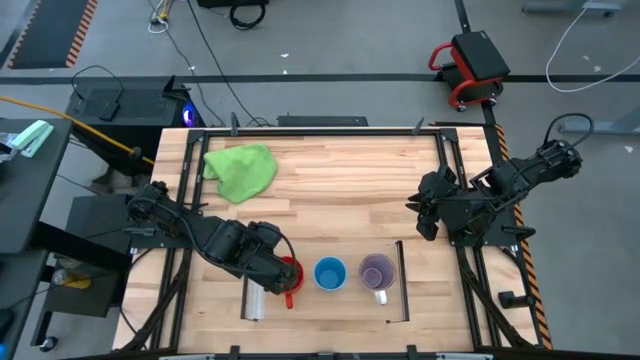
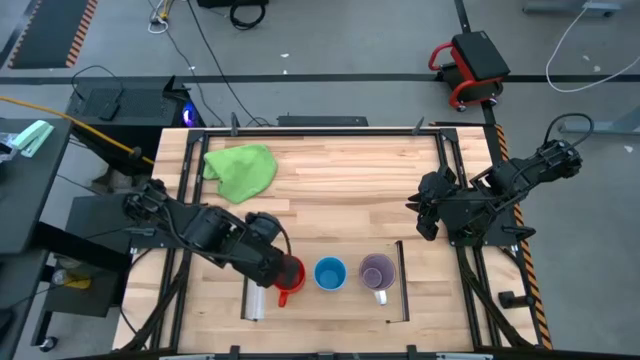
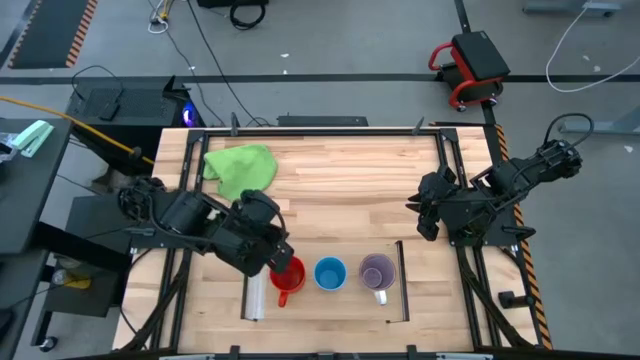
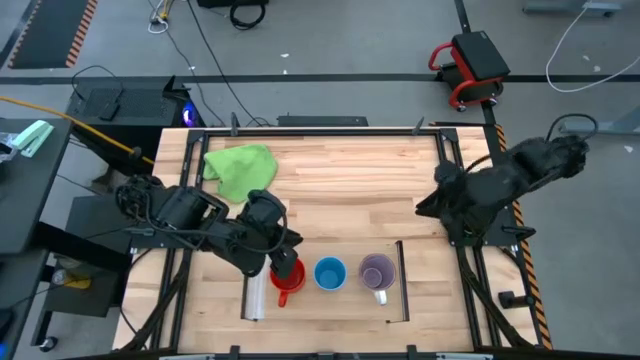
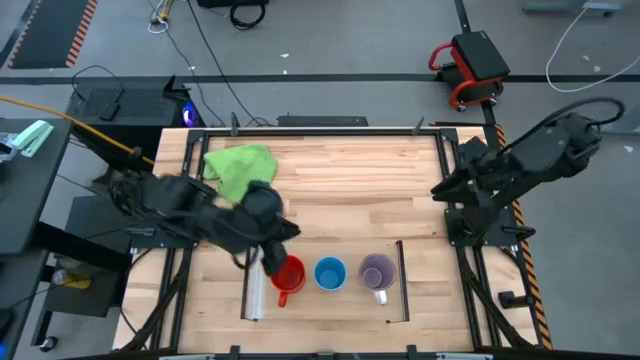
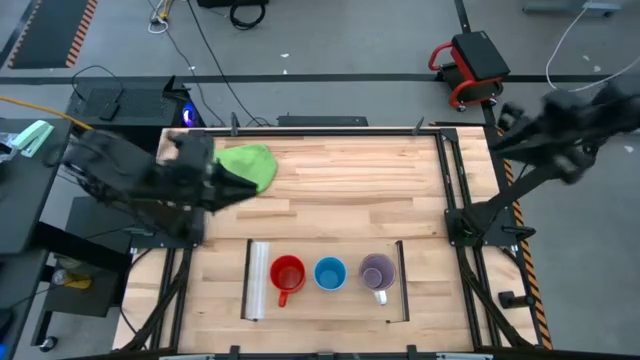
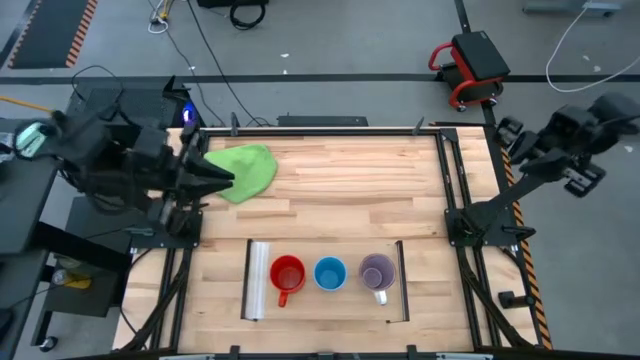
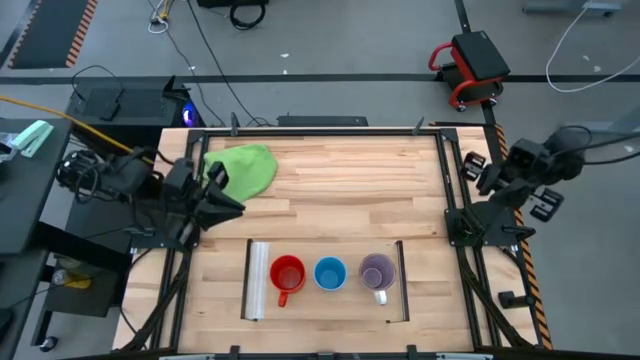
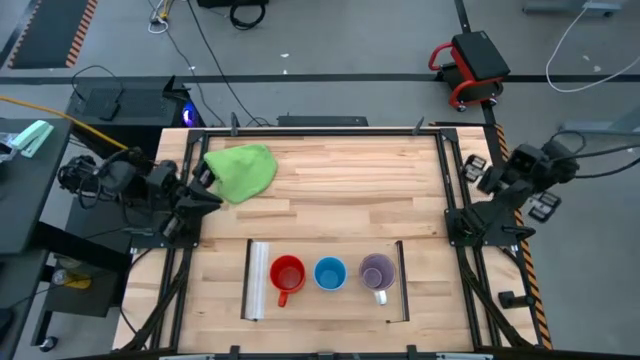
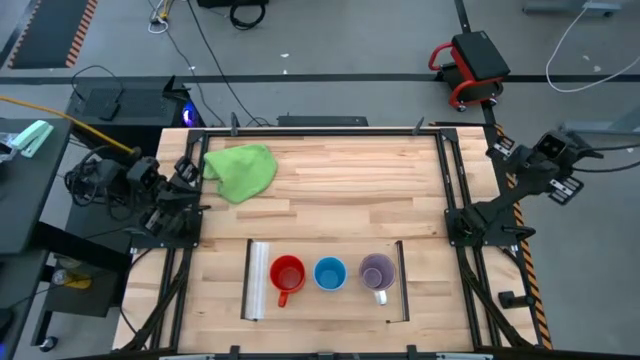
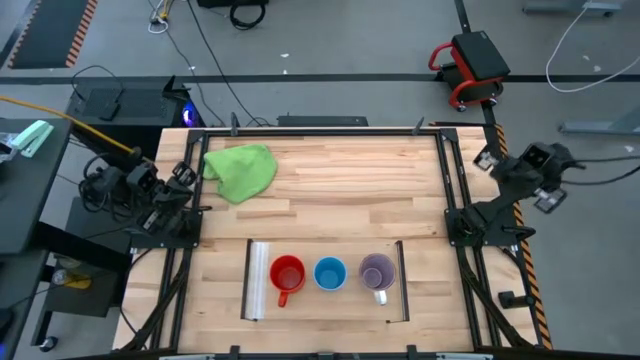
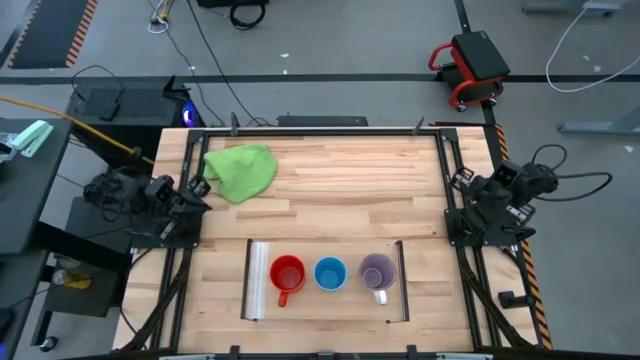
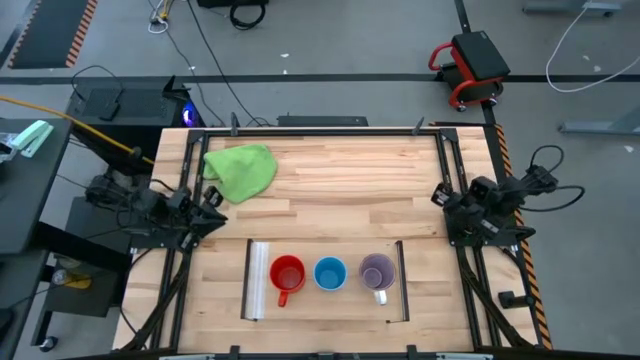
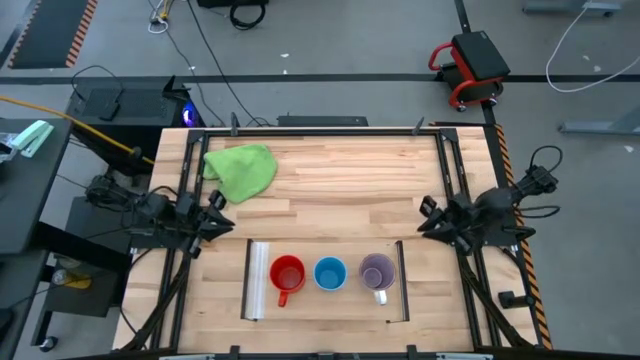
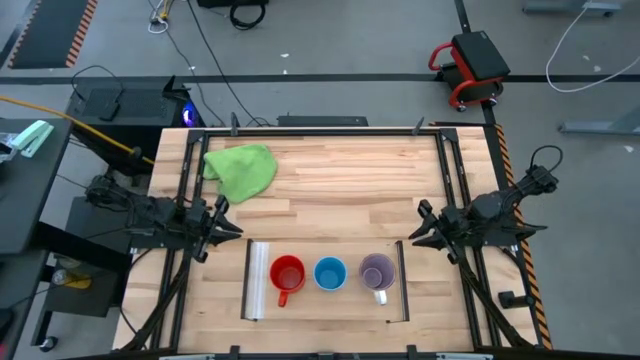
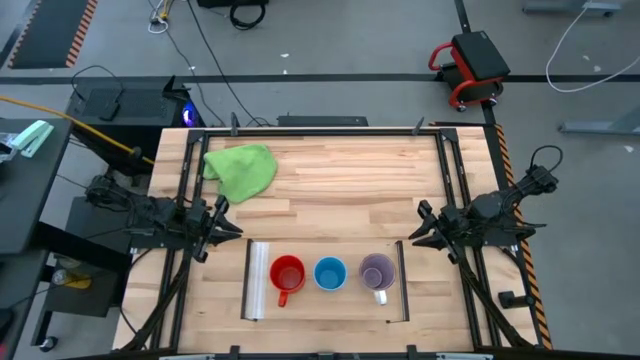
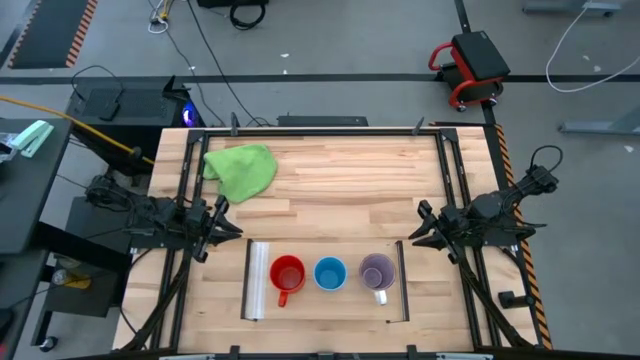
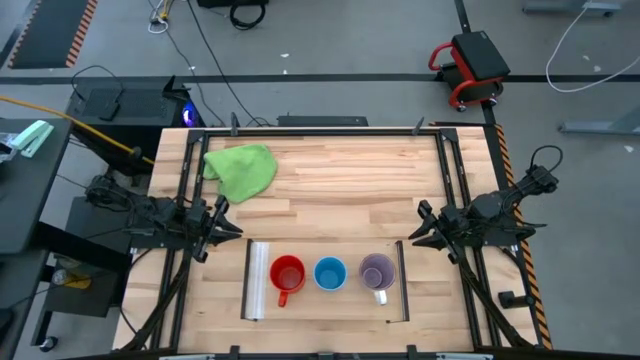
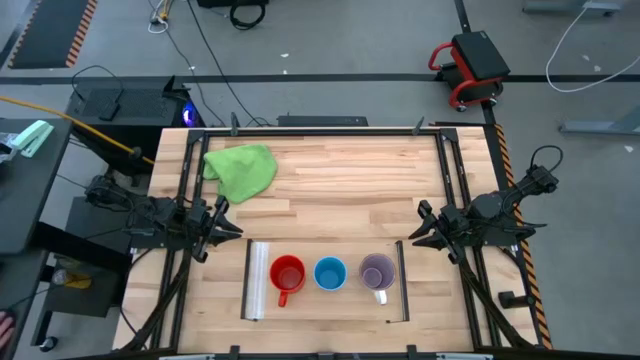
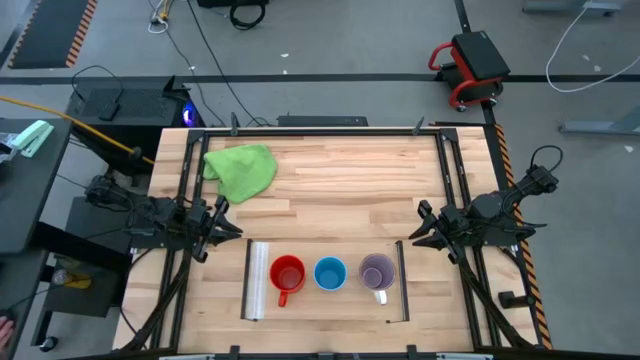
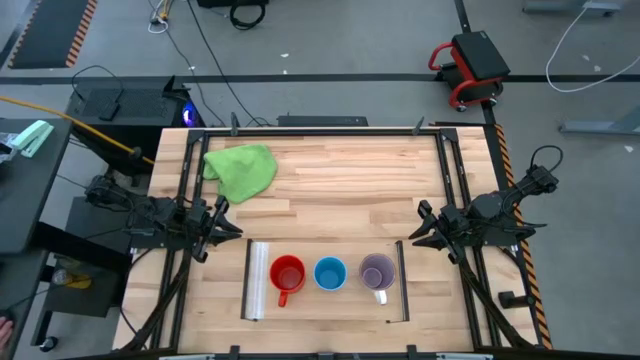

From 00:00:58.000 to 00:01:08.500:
Task: Stack small to large cups/mugs on shelf
Return to Home Position

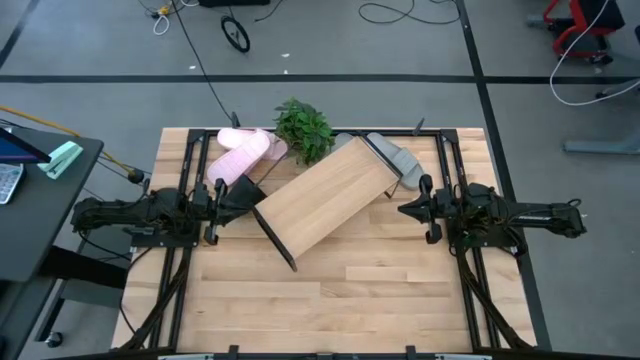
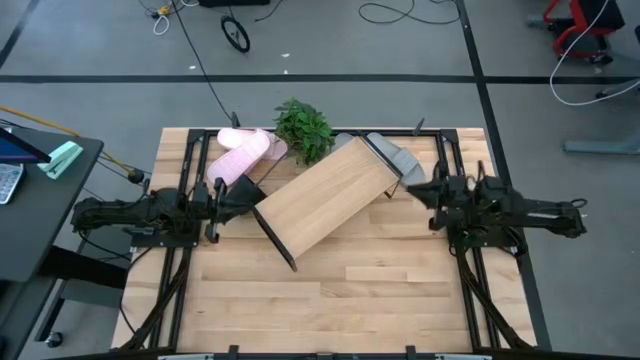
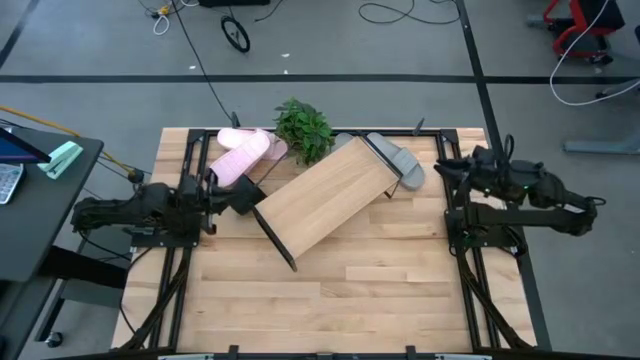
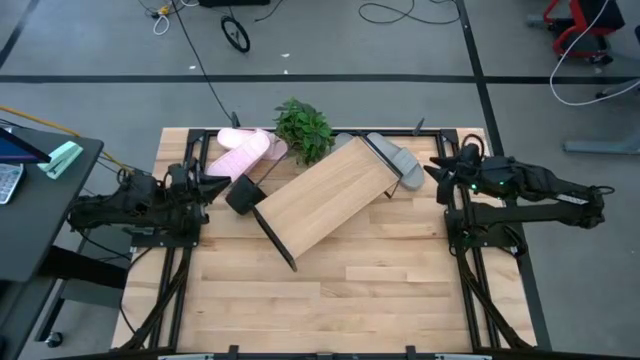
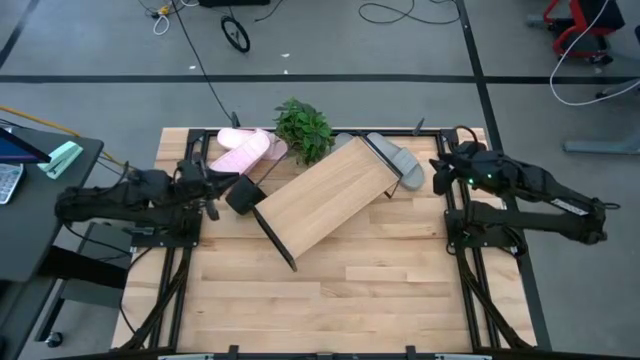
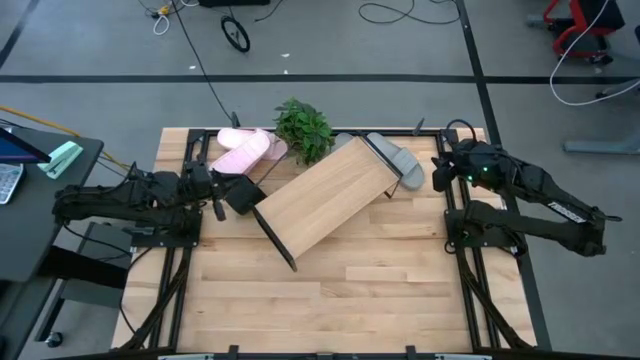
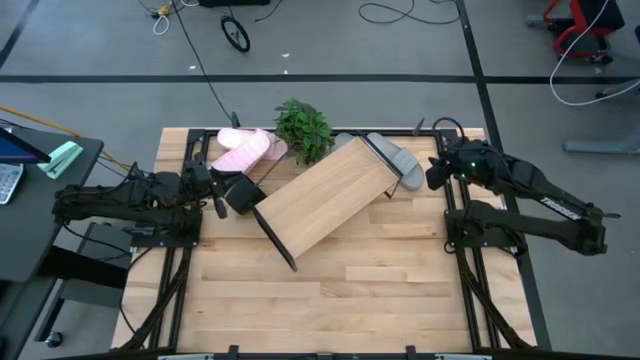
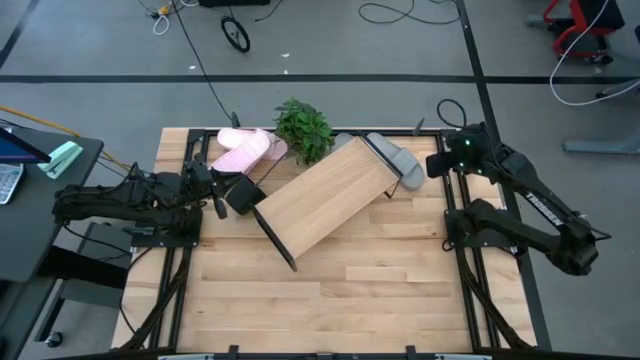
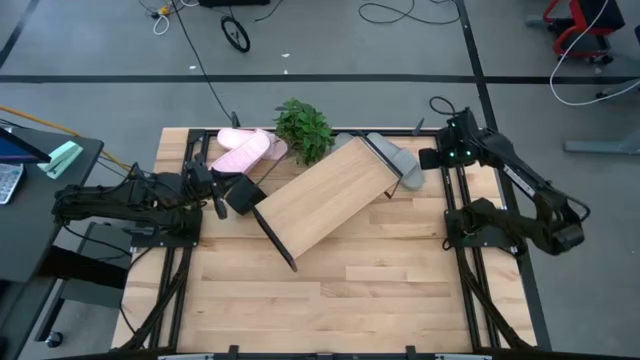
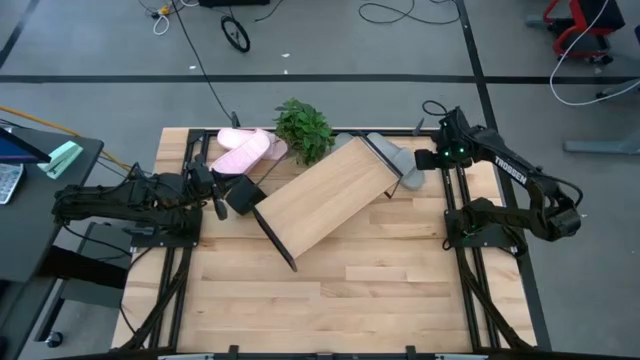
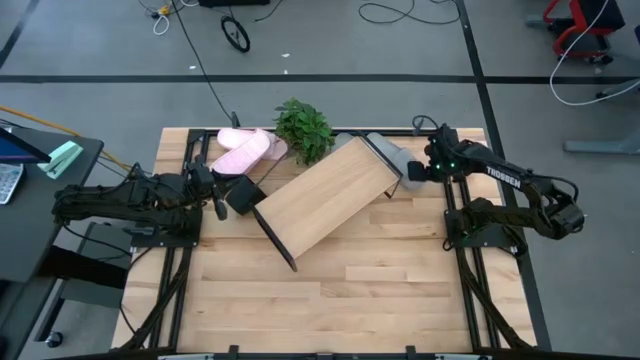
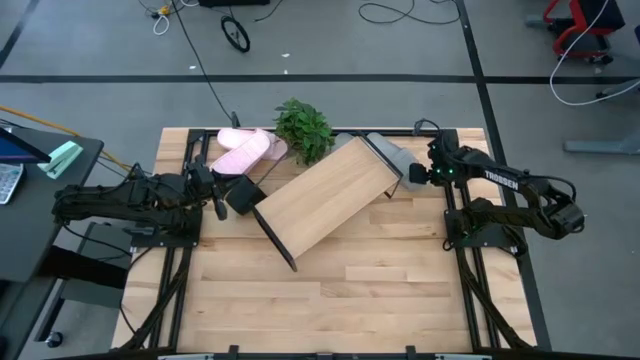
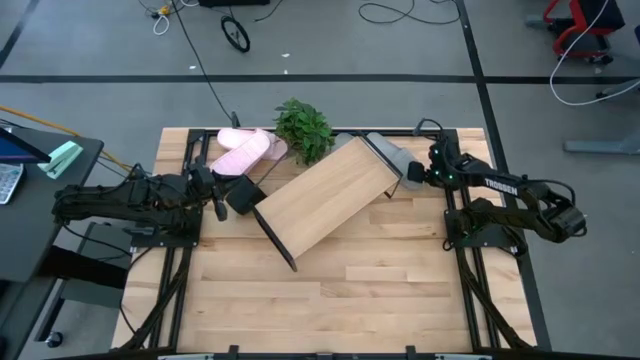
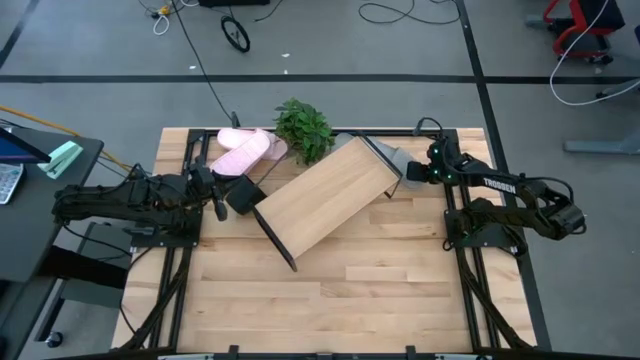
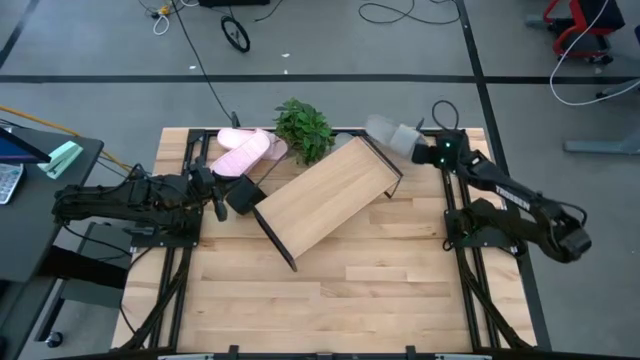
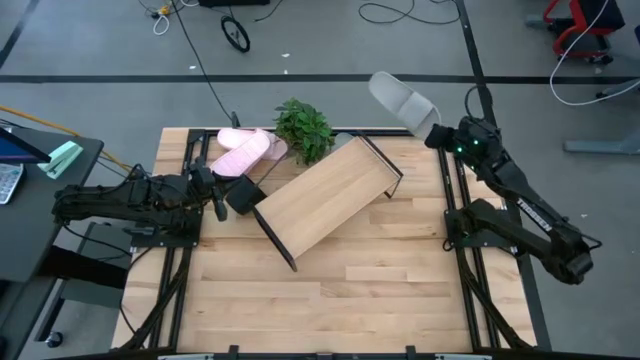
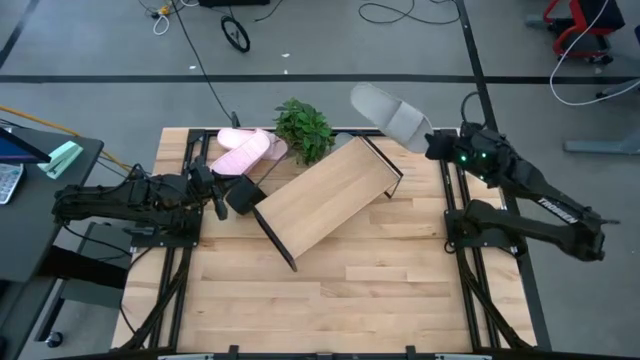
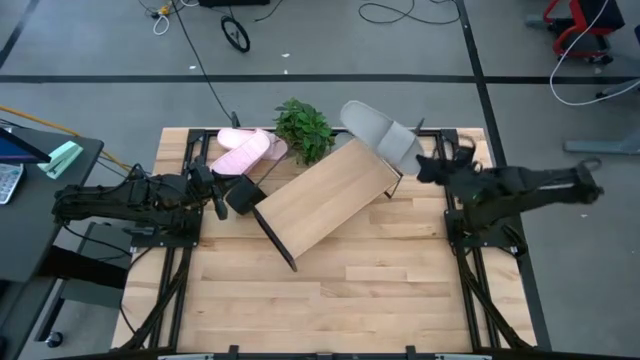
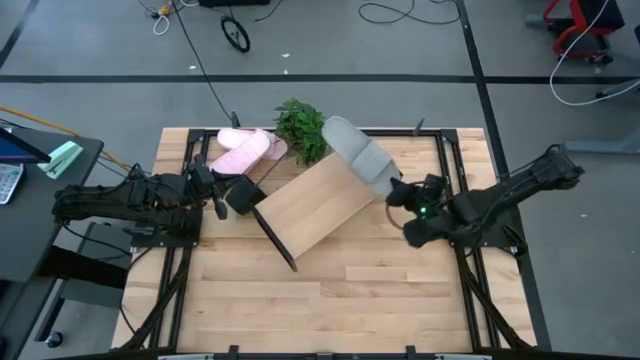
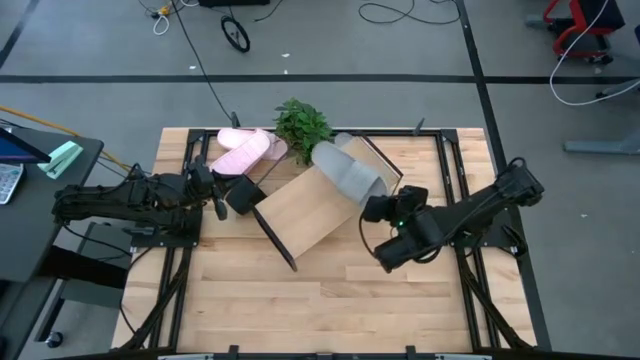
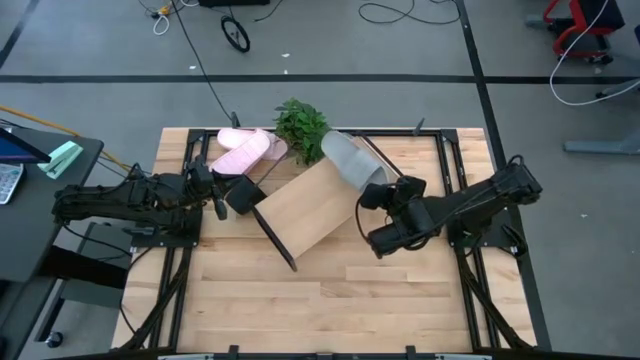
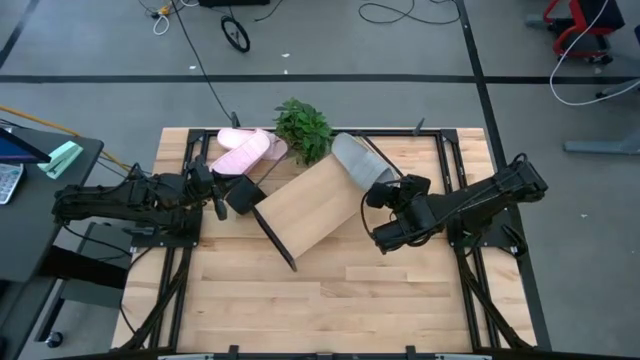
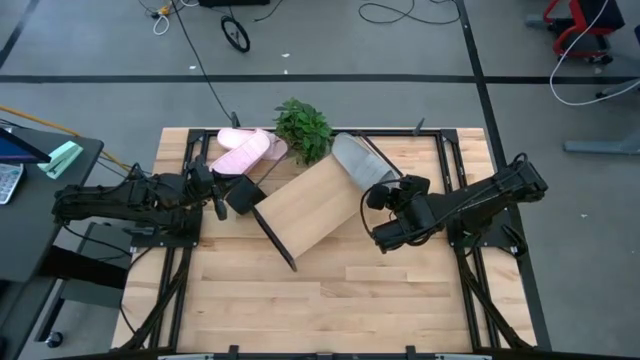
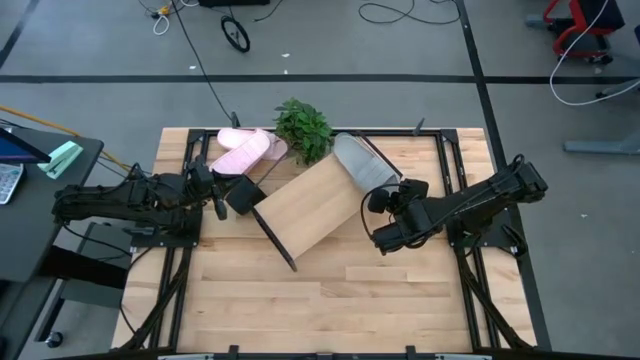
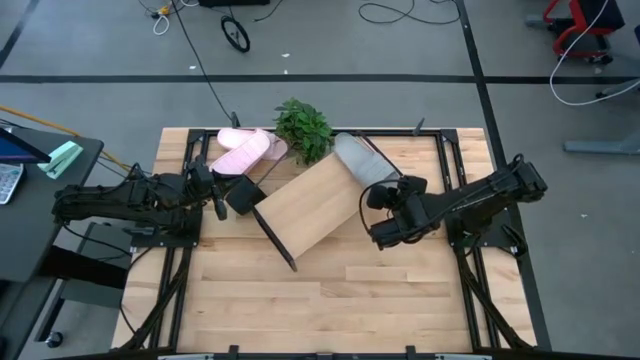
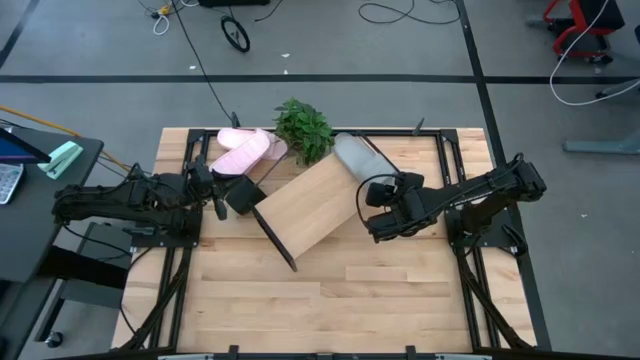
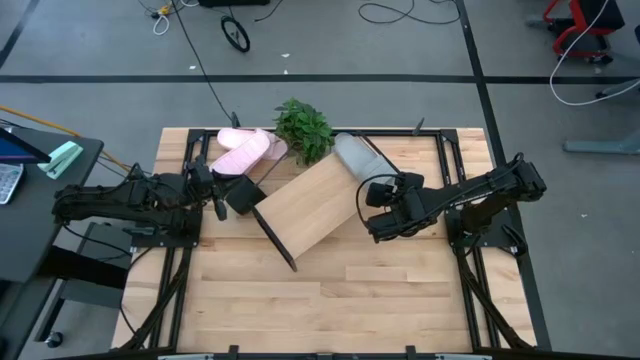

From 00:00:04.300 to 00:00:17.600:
Task: Pick and place slides into the shelf
Put the right gray slides on the shelf
